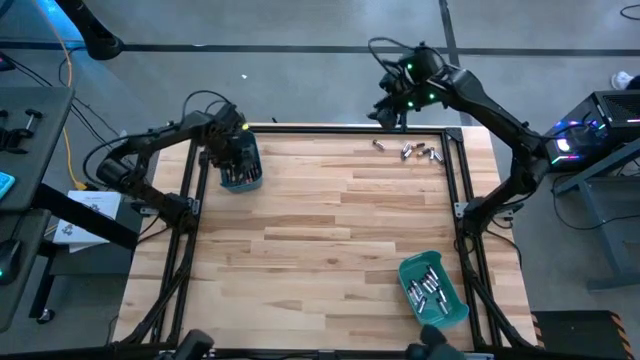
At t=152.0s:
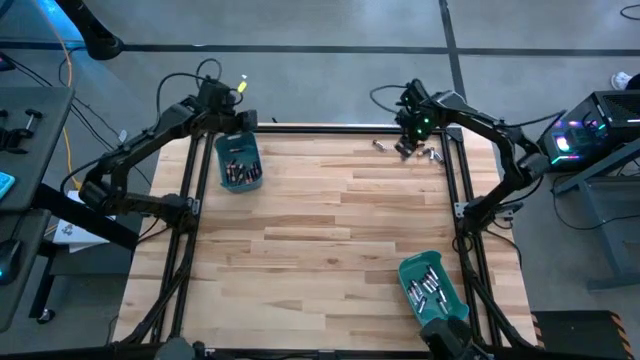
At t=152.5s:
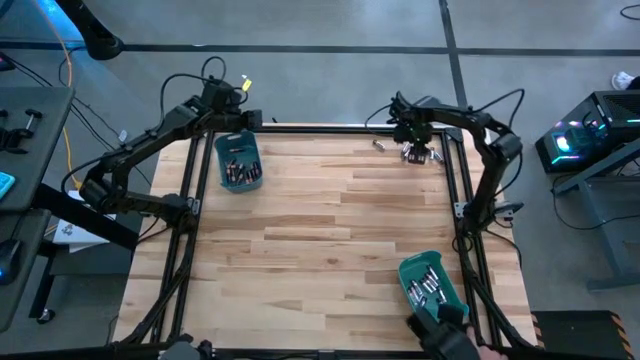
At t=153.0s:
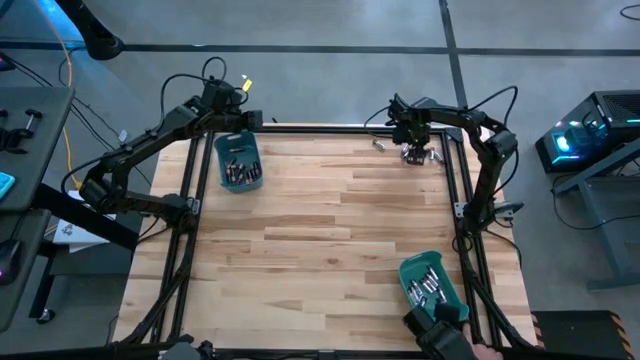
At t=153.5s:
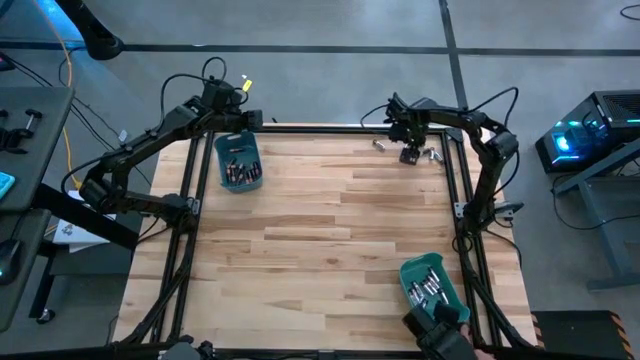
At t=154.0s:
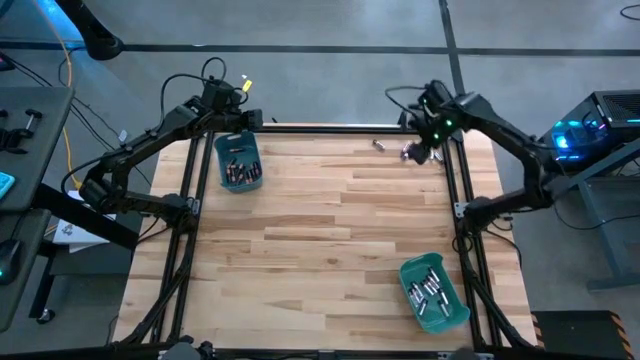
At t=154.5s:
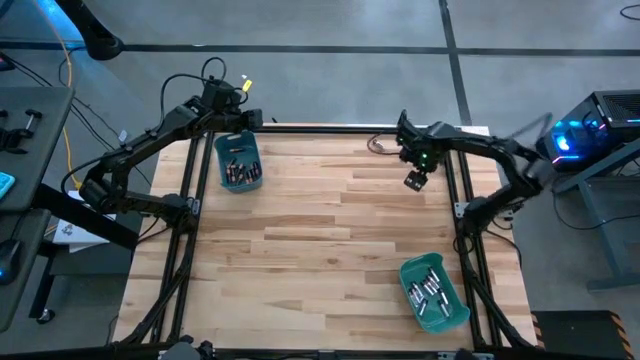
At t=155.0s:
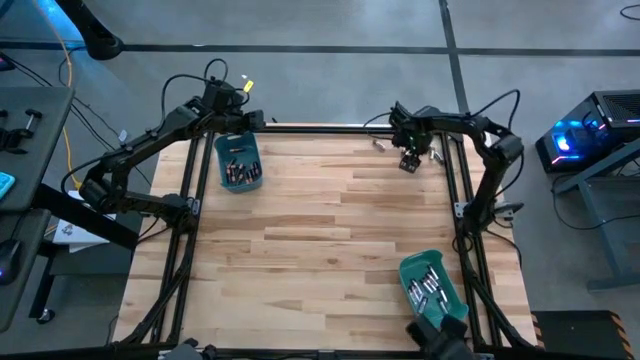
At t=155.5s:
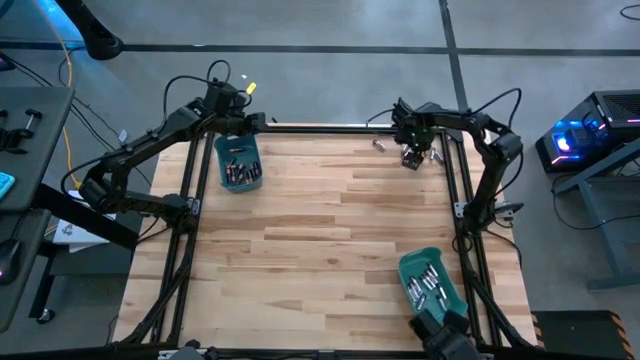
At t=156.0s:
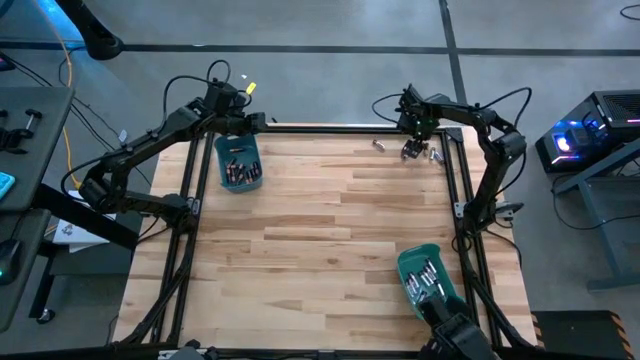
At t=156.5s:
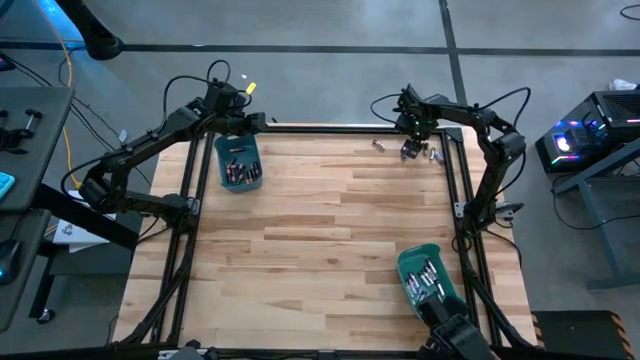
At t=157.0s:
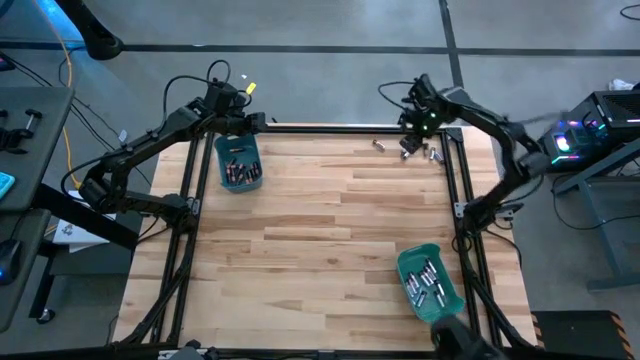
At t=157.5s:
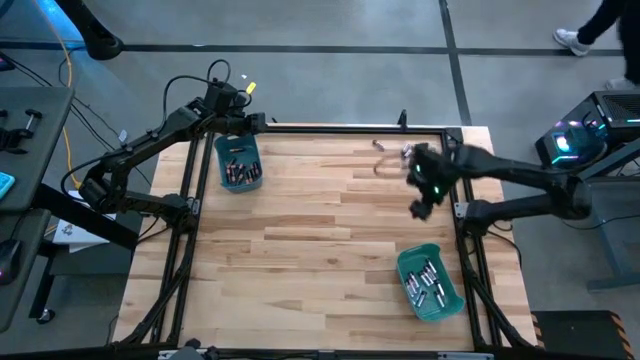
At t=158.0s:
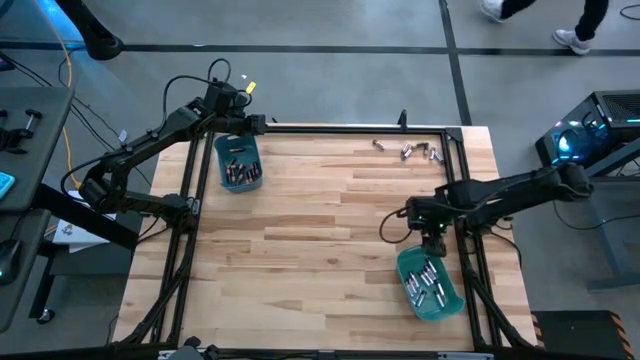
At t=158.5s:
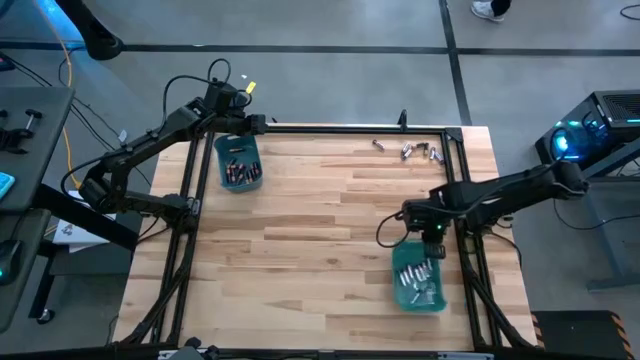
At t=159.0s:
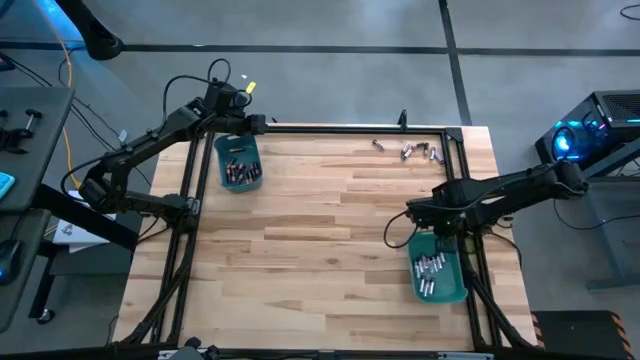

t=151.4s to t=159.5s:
Task: Sort batteries
Adjust the green bin

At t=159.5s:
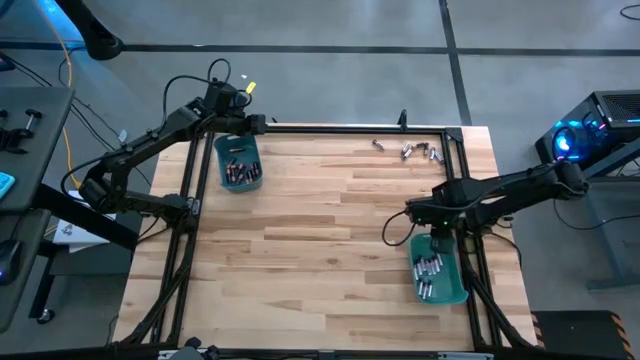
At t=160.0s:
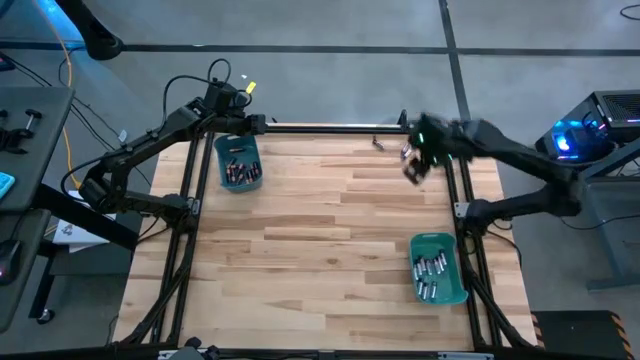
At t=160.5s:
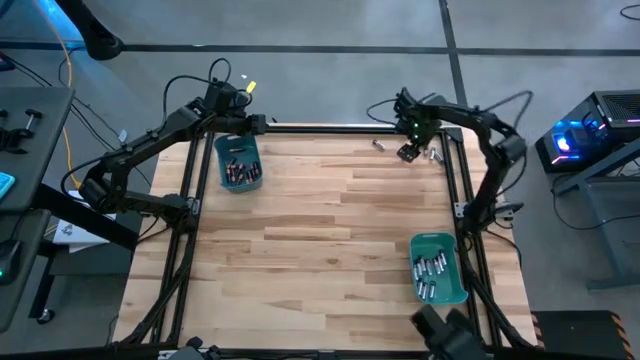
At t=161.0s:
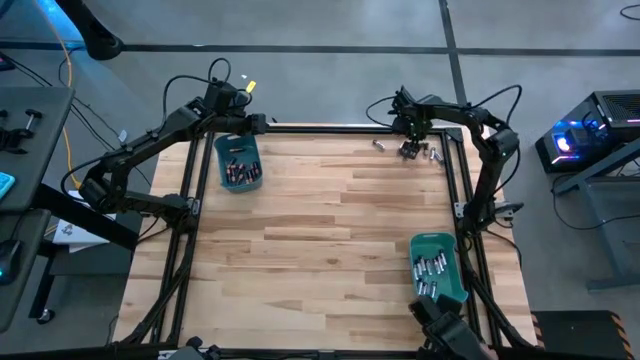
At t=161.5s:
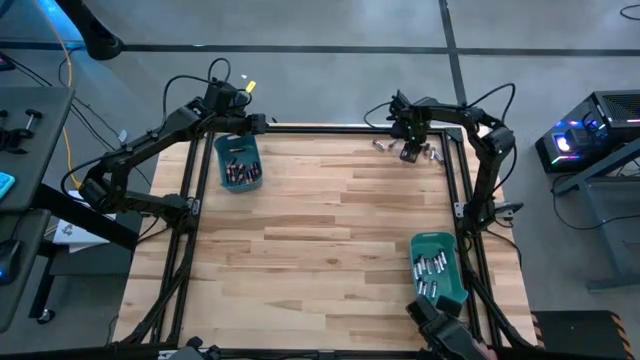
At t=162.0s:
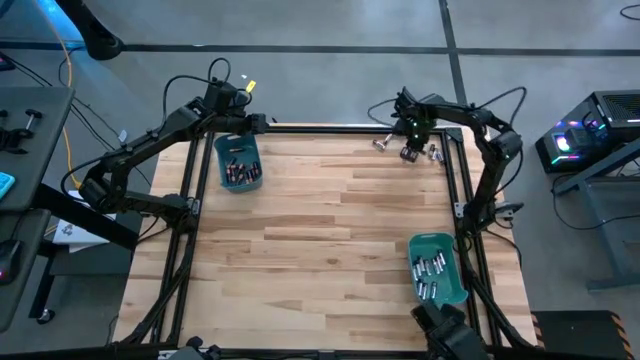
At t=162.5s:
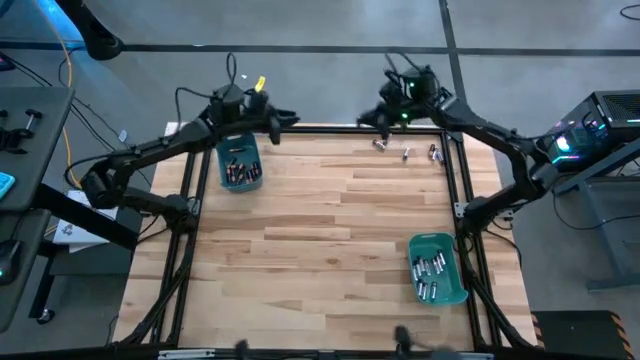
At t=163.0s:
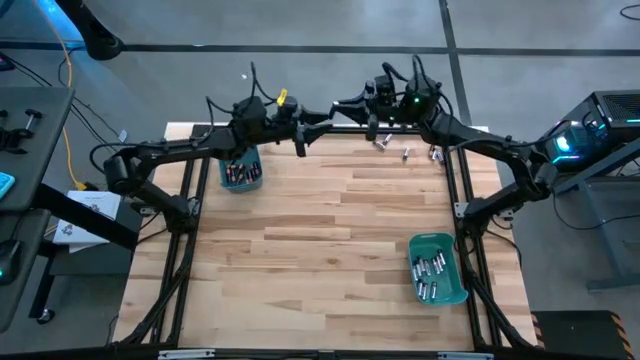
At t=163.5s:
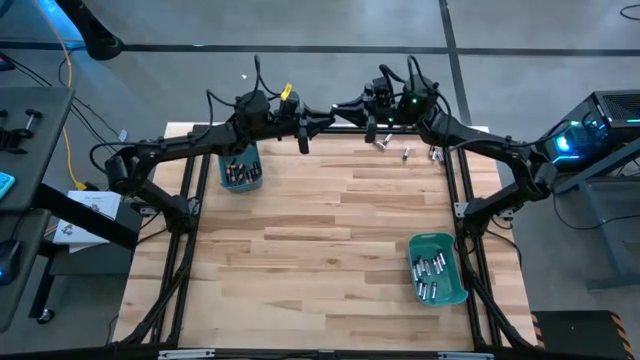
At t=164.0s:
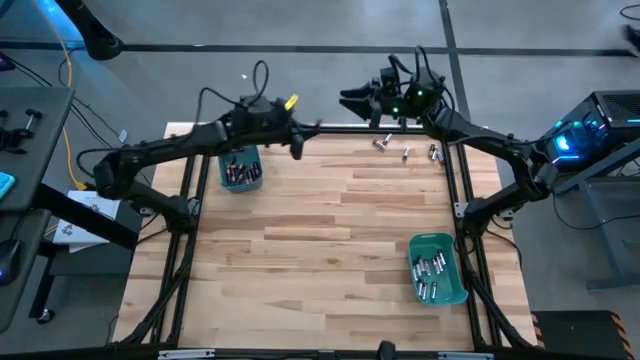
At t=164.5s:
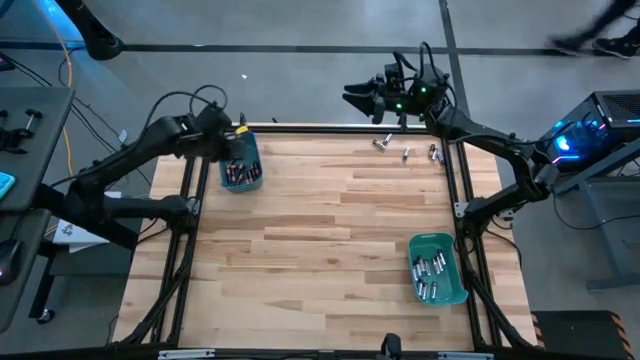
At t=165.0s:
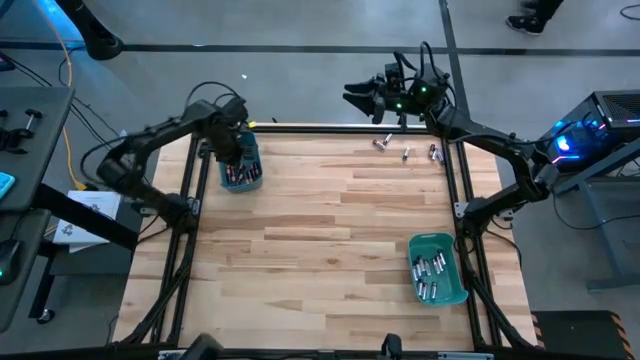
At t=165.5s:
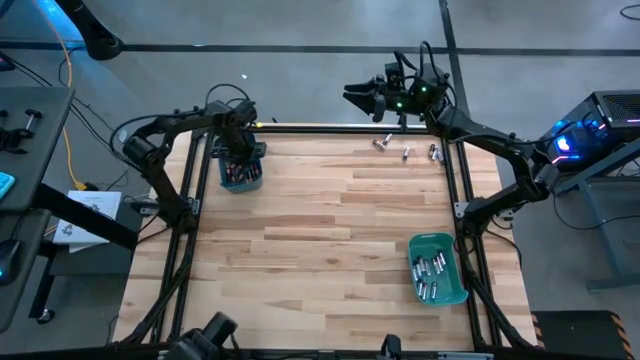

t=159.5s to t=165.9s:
Put the black battery into the blue bin

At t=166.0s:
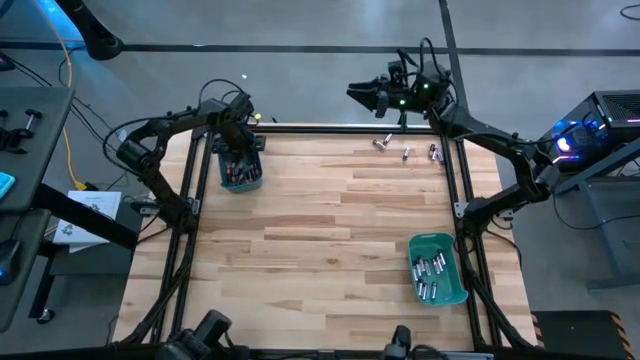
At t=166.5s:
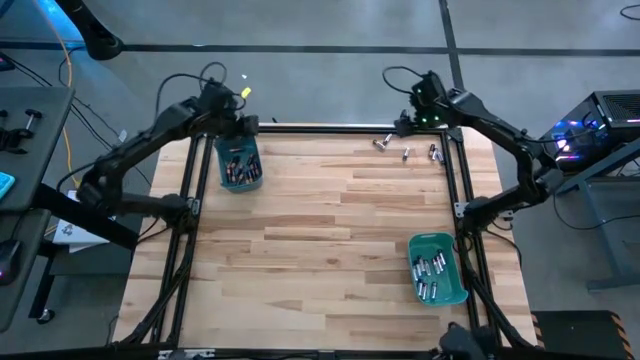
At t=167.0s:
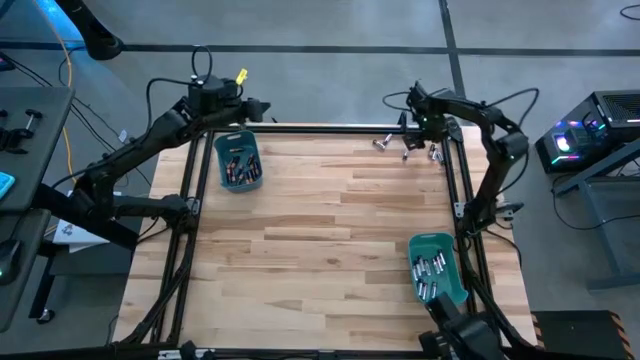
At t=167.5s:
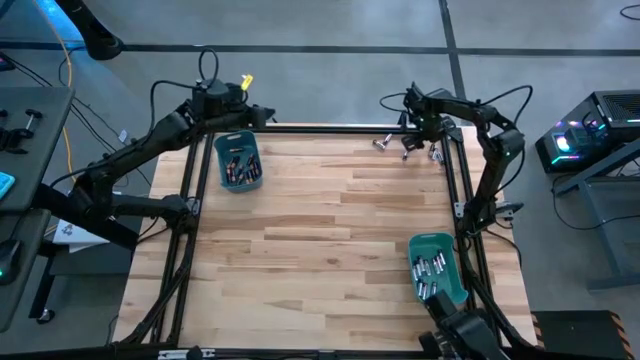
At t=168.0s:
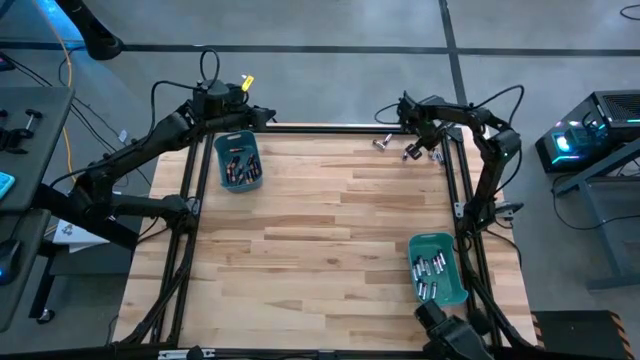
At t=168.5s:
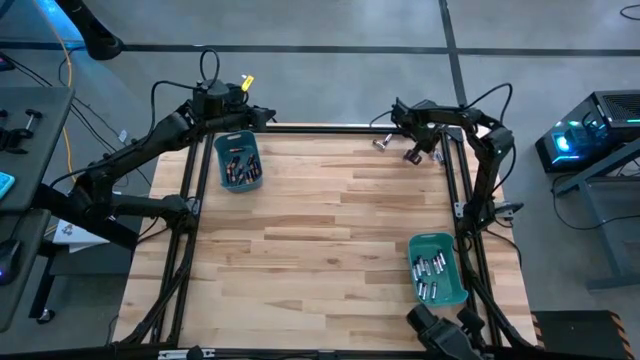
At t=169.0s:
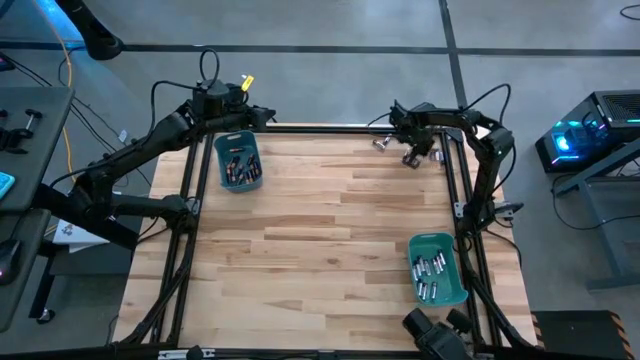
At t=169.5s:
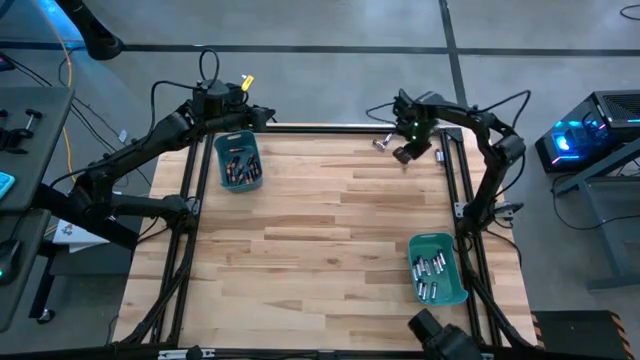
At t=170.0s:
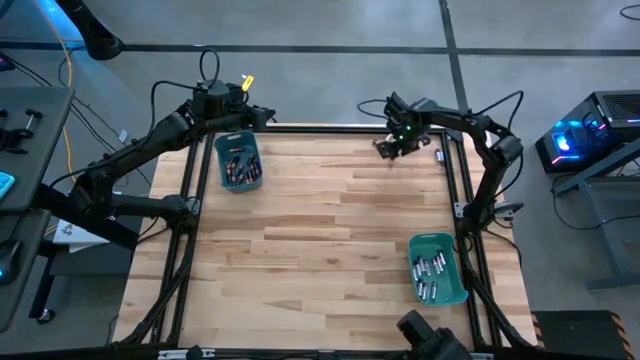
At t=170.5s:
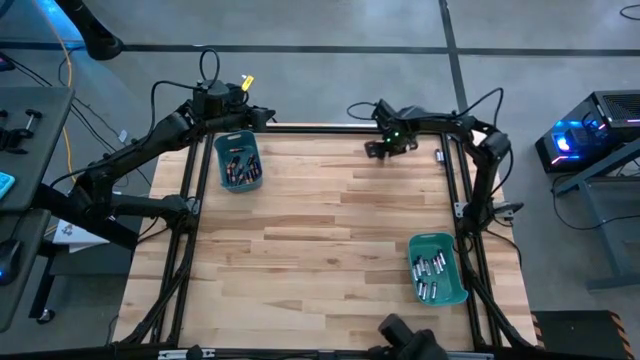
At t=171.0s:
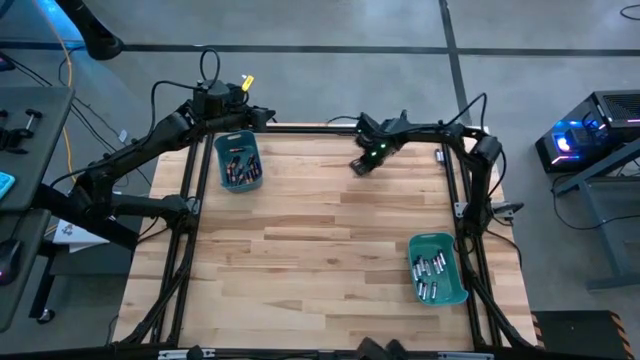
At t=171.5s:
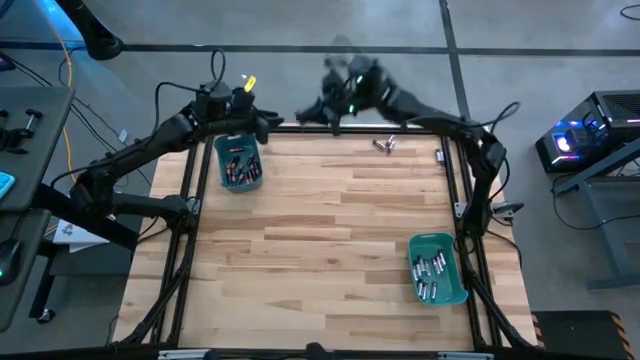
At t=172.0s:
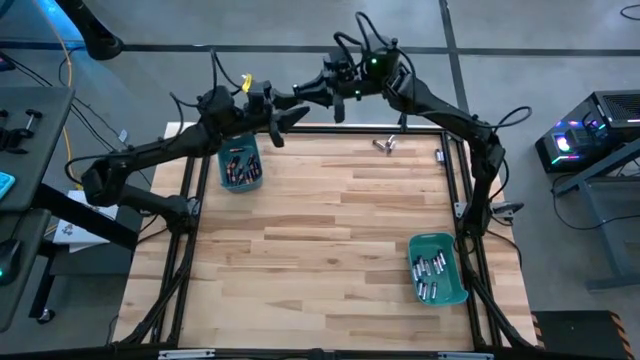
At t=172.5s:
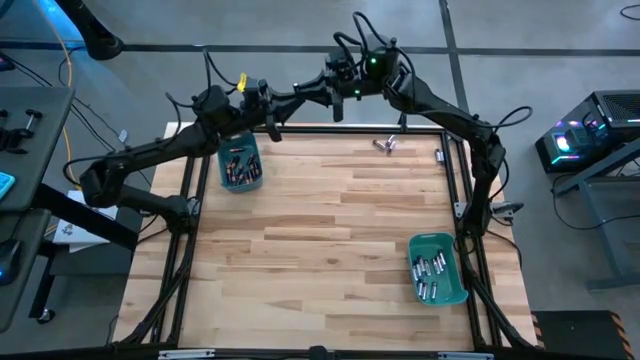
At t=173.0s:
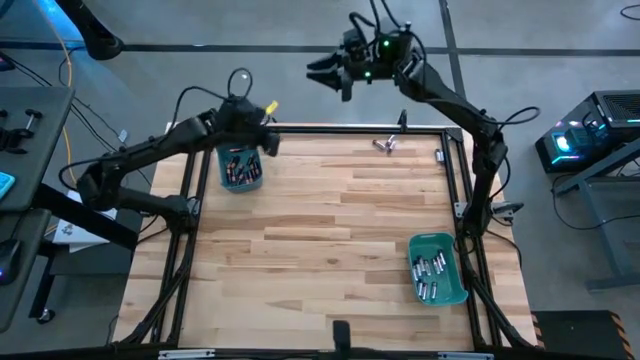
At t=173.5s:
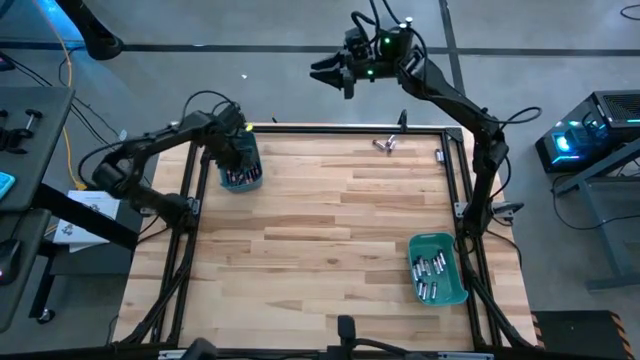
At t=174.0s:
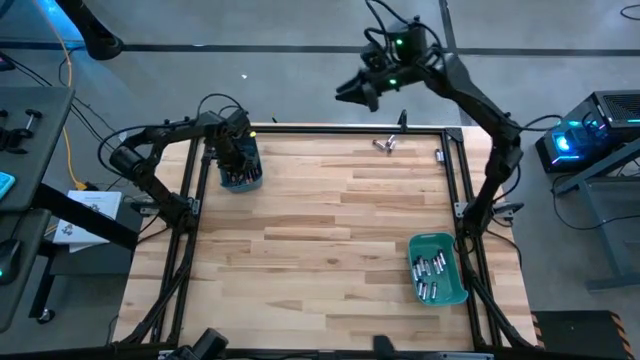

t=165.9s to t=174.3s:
Put the black battery into the blue bin
